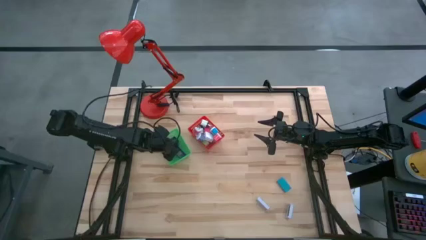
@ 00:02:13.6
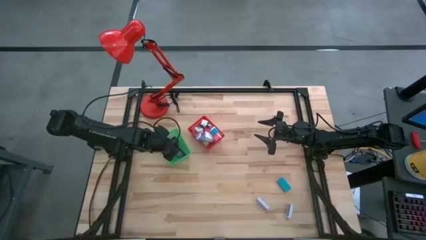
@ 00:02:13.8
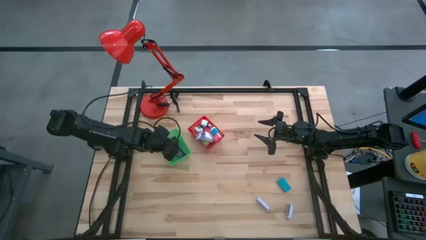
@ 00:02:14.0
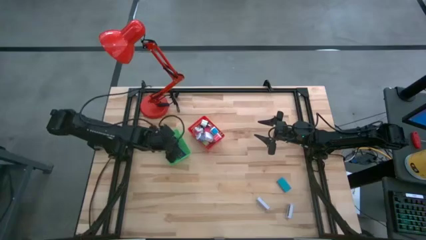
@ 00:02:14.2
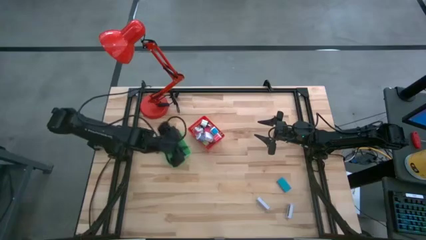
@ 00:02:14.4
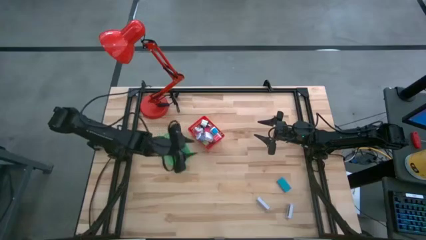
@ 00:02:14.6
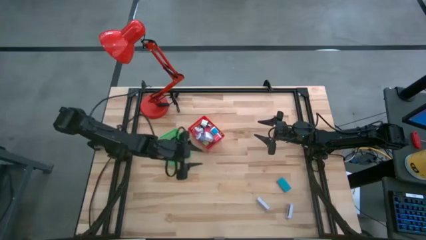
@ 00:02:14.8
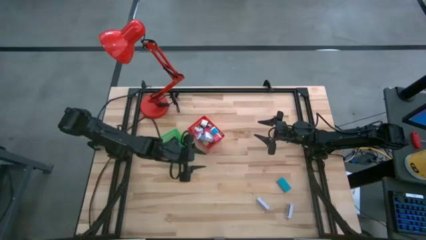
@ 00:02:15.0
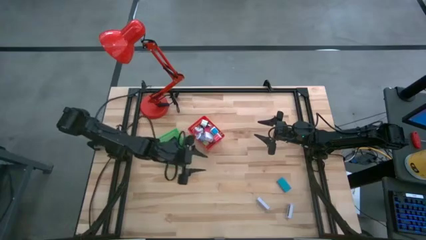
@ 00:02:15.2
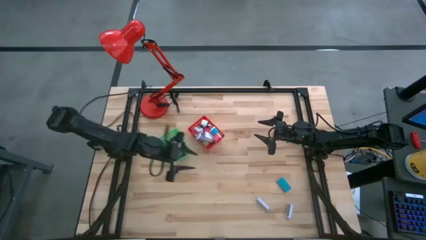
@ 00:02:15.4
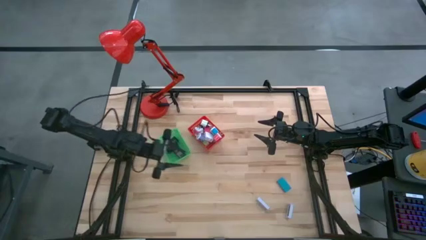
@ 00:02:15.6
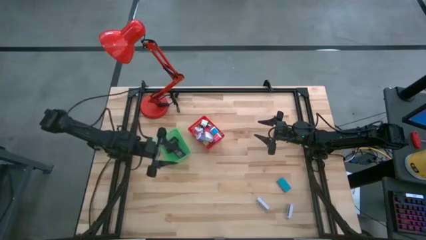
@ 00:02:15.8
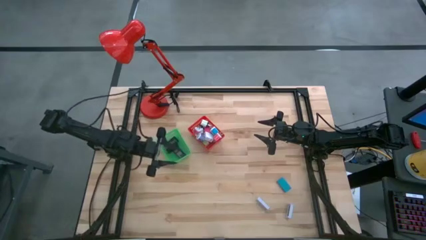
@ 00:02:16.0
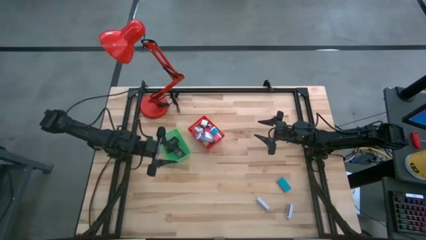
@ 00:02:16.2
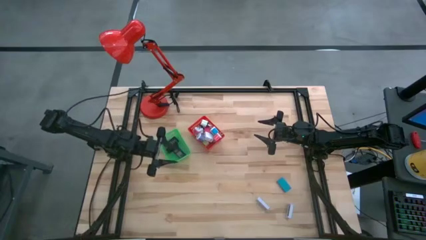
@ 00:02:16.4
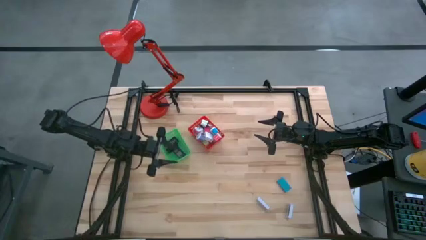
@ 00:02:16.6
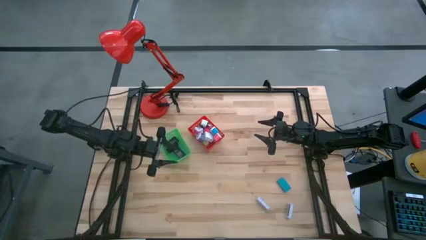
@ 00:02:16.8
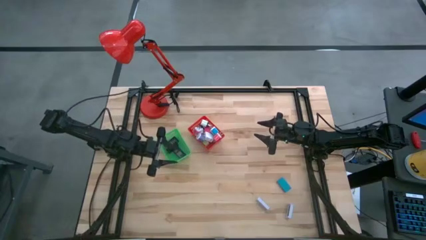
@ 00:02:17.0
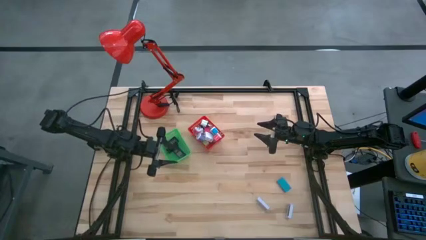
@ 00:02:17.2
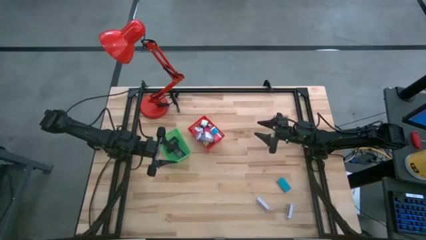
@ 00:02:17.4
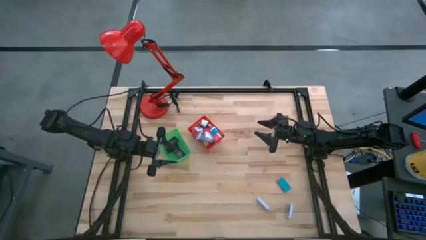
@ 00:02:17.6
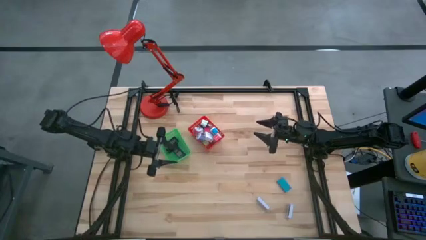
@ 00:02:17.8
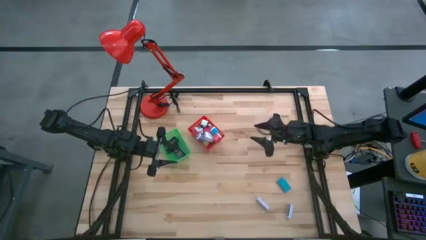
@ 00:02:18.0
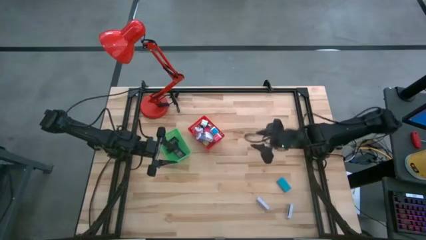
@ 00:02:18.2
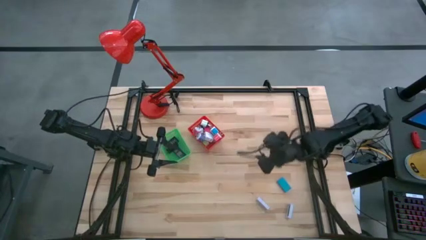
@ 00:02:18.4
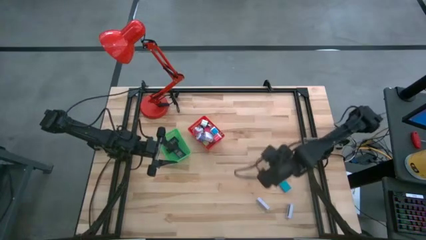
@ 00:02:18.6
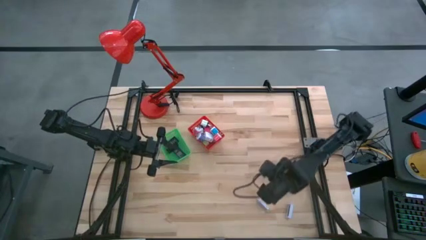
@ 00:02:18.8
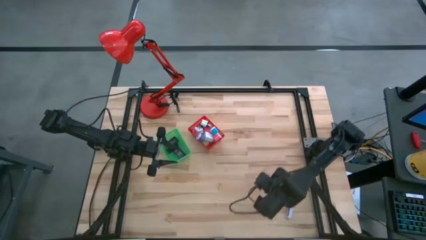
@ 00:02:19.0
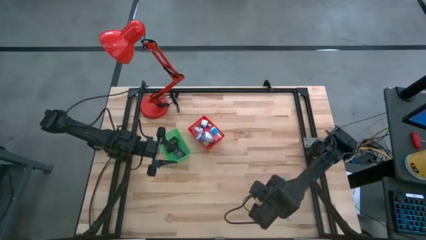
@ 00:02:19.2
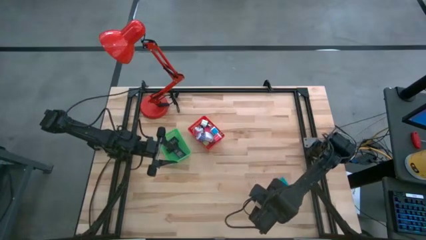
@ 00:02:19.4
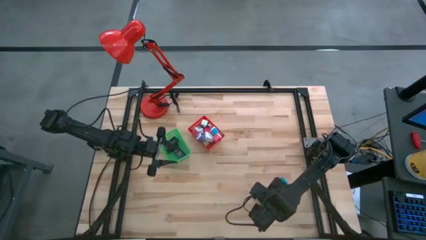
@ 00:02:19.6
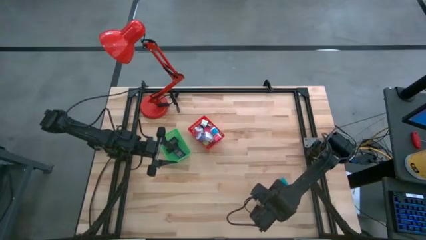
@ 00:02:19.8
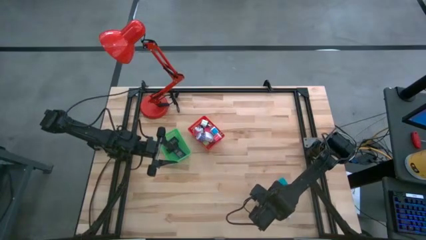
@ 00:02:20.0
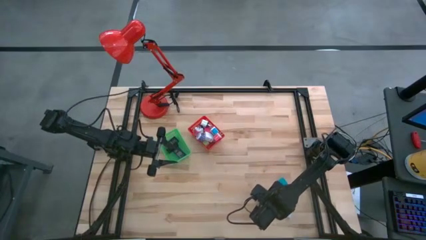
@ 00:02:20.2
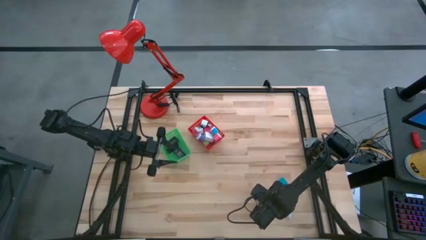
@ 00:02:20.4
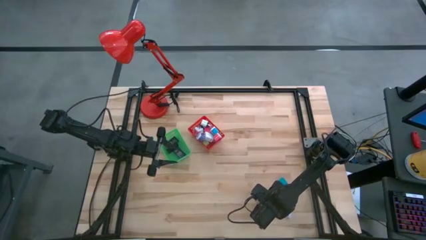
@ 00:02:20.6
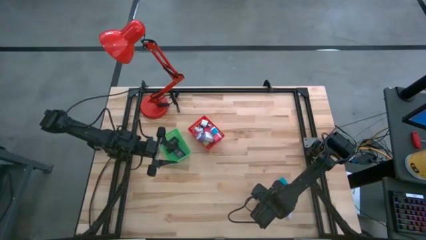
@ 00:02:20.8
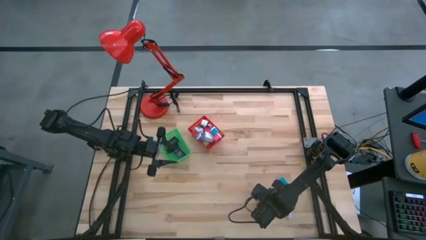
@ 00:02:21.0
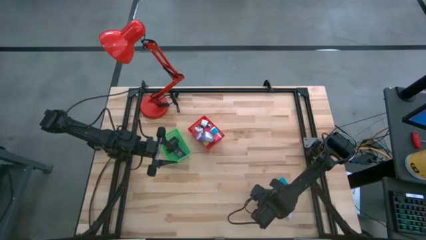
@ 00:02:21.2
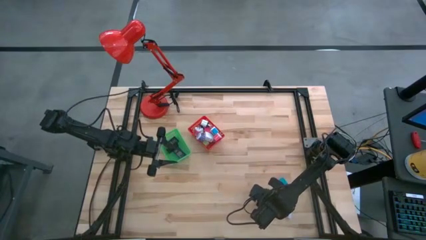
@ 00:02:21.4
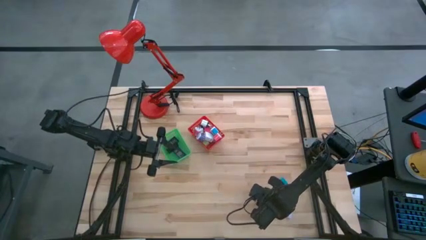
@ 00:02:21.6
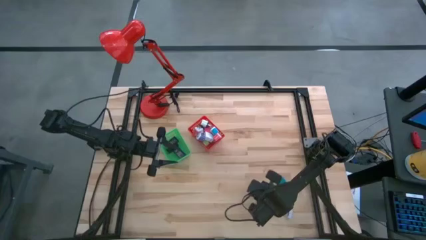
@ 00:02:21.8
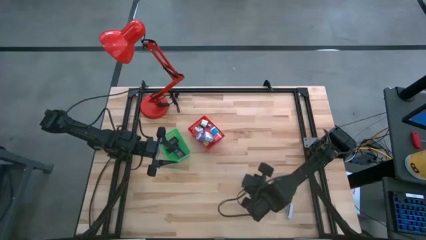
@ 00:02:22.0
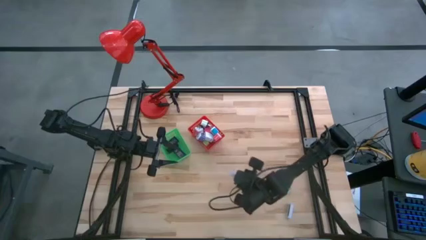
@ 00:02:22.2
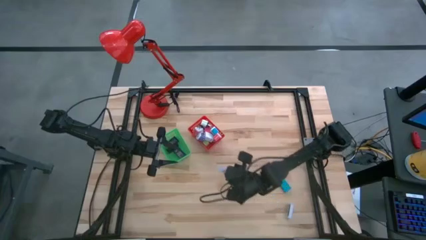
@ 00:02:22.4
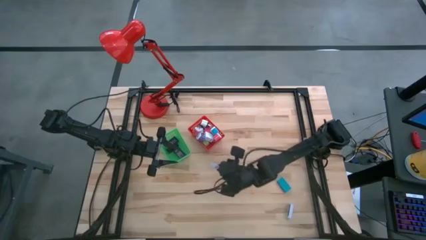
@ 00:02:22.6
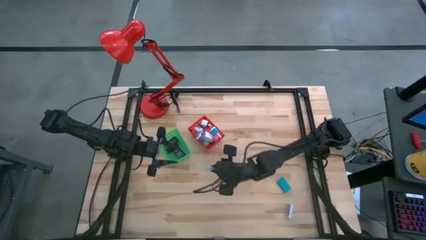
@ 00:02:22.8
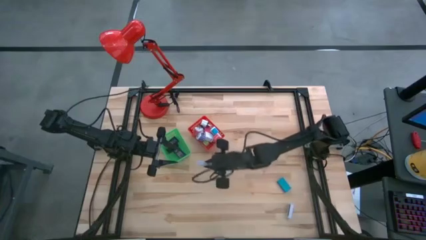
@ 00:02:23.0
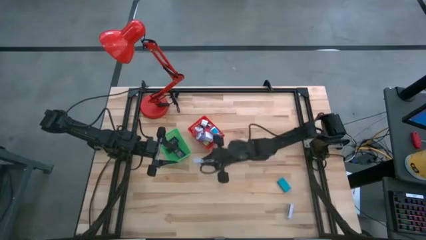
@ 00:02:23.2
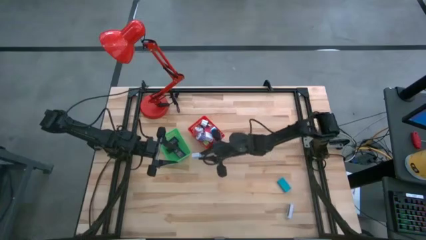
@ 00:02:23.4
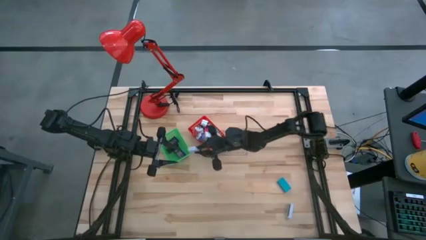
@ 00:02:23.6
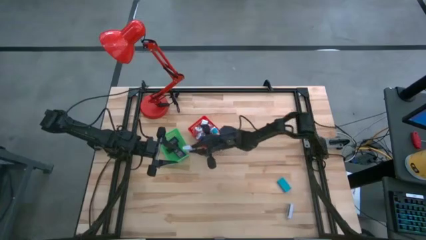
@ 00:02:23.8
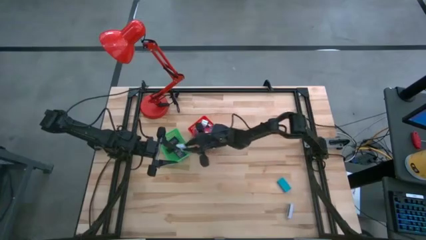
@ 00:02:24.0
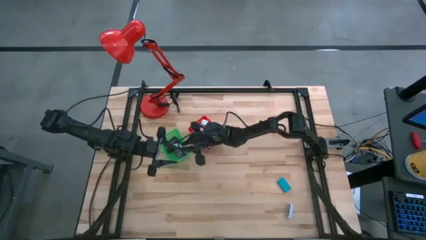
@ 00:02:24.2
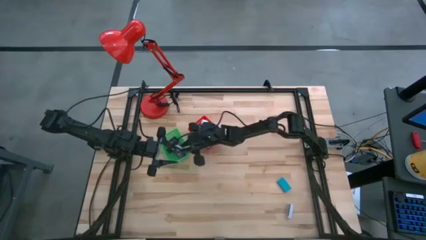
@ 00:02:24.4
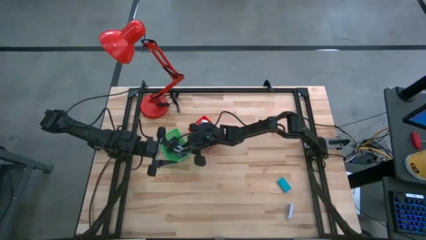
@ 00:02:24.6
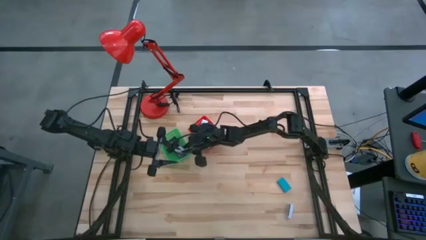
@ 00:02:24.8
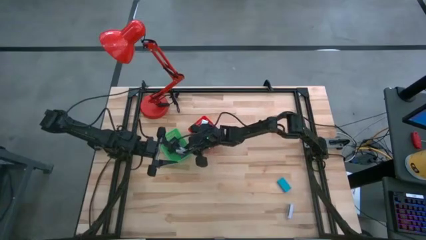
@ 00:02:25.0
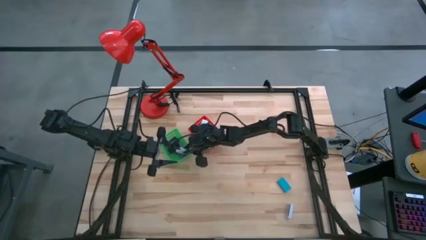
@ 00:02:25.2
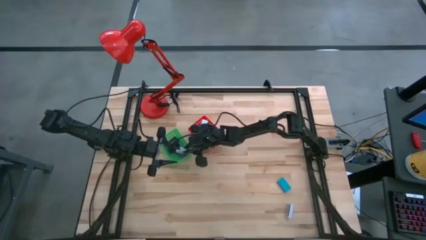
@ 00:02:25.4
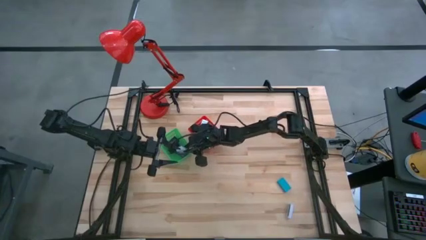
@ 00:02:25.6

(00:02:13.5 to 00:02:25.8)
Task: Pick & Place Office items
Put the left white timer into the green bin

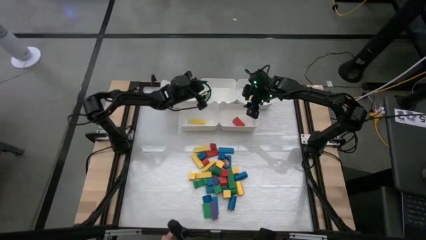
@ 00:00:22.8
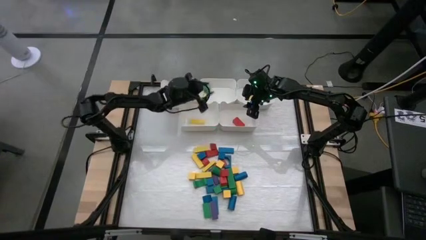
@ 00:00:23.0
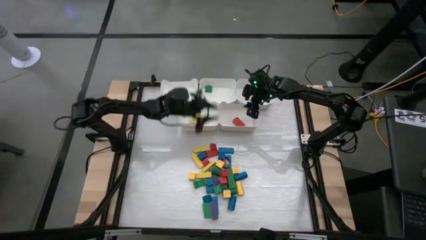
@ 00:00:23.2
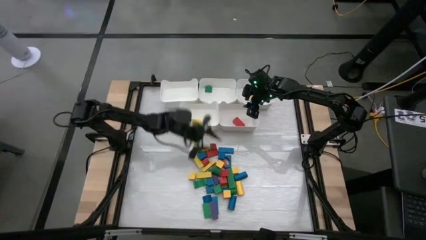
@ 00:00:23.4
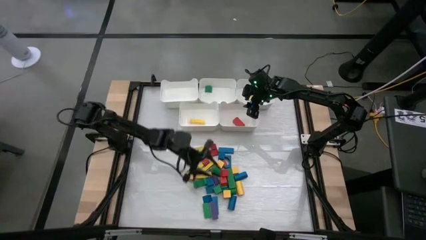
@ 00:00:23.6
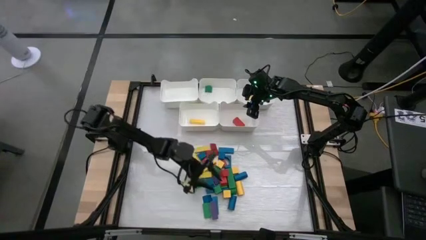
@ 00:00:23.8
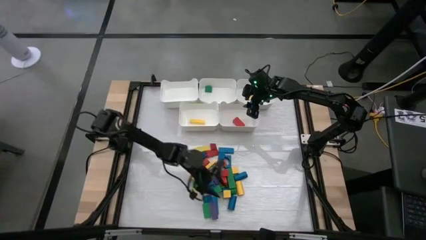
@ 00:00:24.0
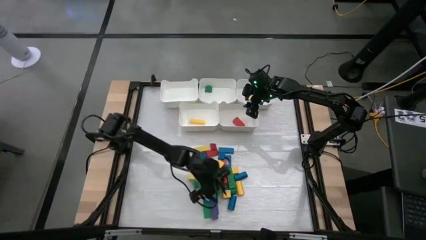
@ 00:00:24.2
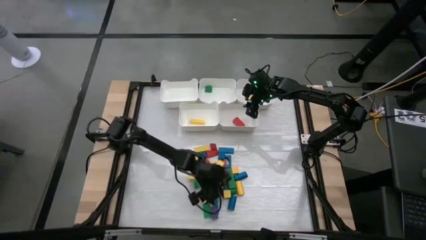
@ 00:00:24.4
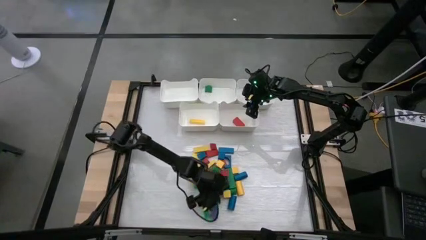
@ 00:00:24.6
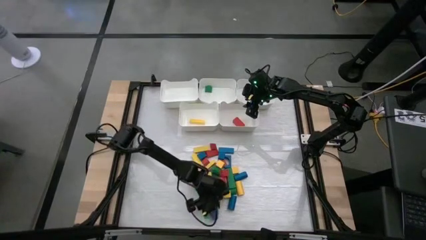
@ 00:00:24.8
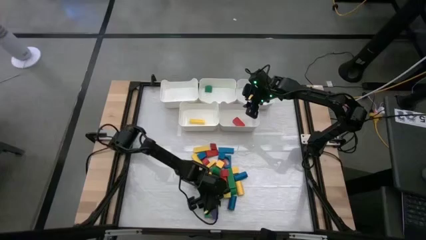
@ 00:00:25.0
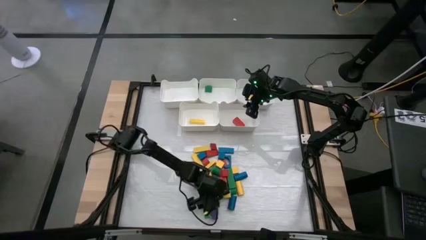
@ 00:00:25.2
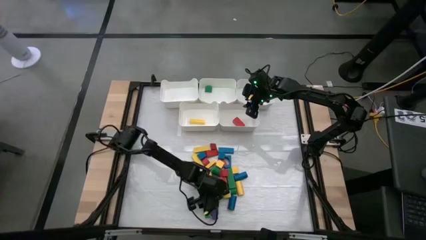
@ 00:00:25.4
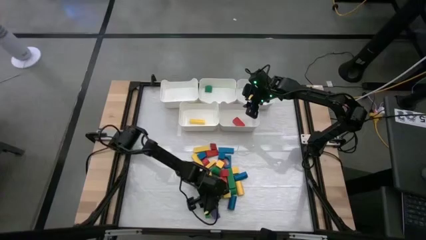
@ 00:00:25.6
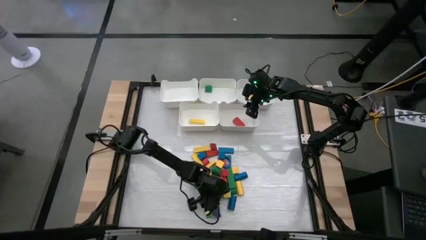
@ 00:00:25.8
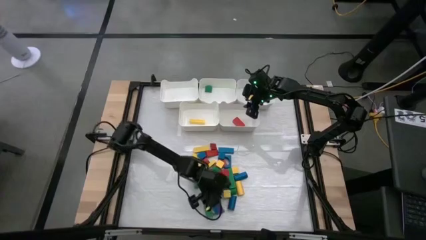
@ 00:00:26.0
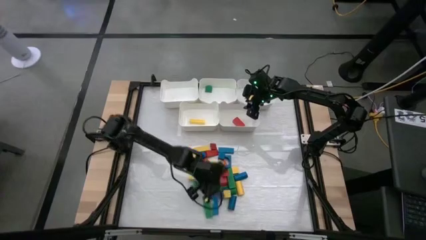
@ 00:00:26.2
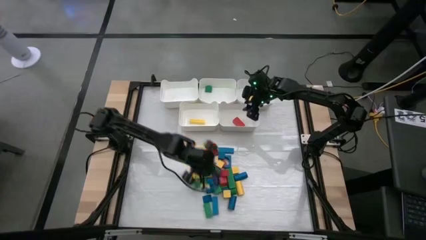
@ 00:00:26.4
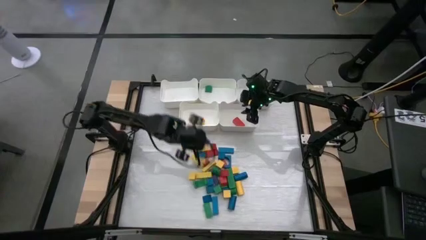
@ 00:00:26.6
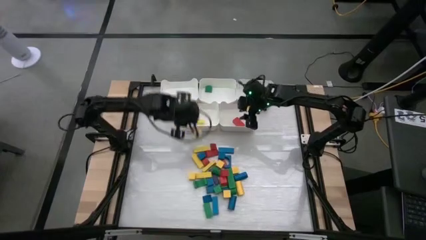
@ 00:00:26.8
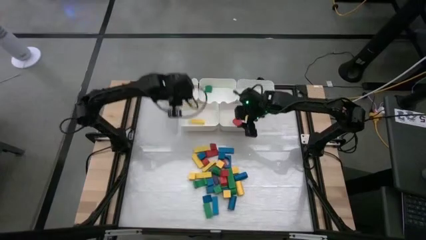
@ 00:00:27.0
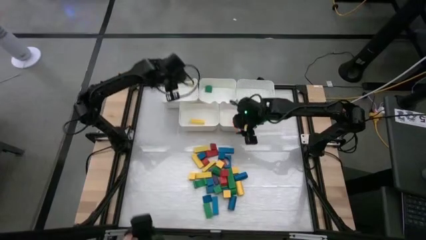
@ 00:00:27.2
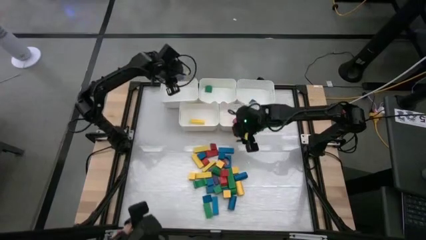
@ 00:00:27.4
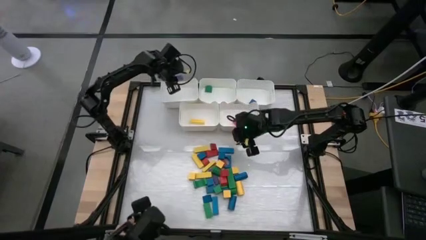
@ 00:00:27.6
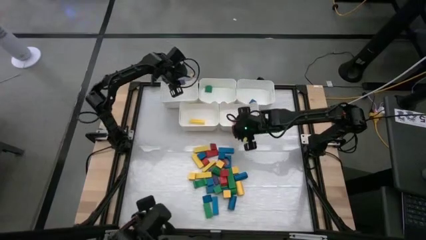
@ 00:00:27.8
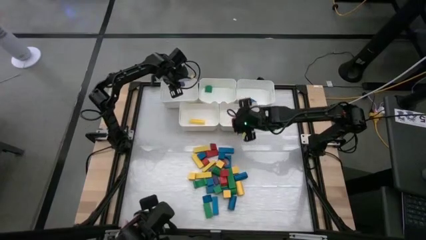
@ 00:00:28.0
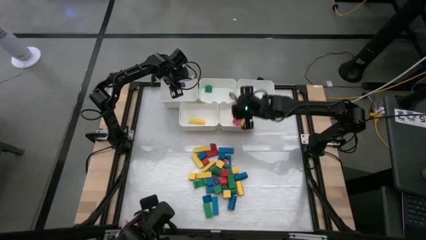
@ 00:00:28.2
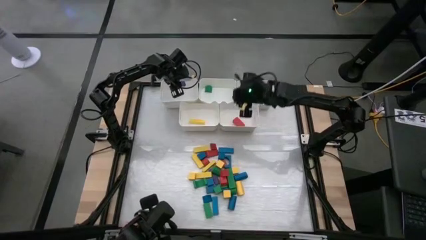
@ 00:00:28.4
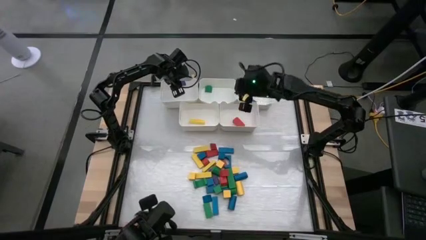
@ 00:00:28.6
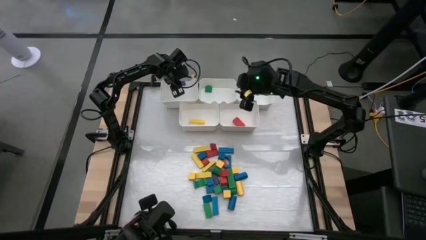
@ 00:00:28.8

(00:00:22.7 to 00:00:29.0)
Task: Sort blocks
Put the violet block into the top left bin
